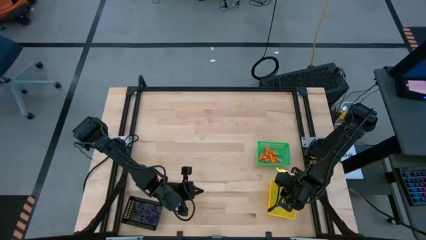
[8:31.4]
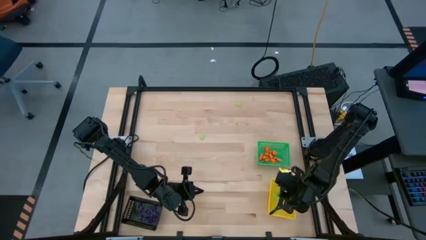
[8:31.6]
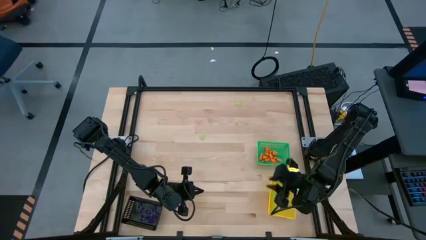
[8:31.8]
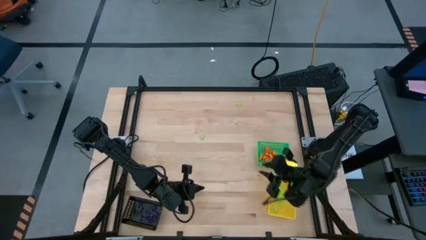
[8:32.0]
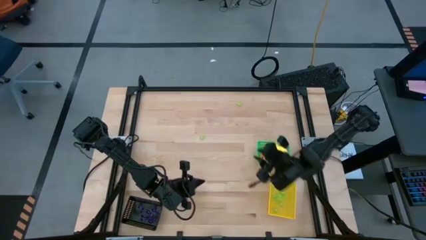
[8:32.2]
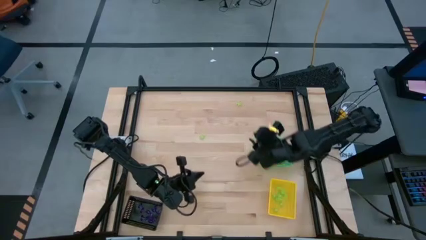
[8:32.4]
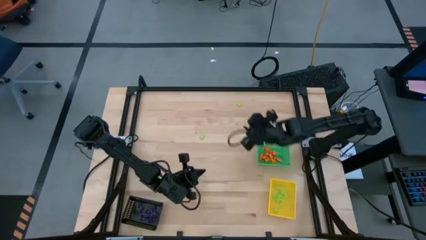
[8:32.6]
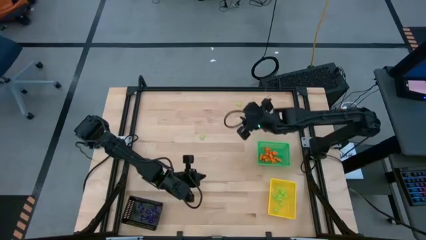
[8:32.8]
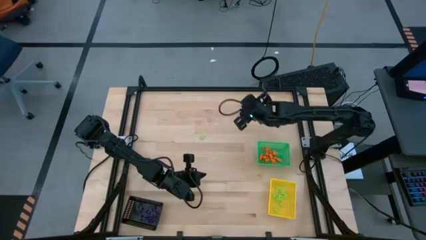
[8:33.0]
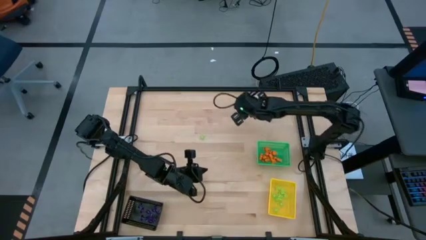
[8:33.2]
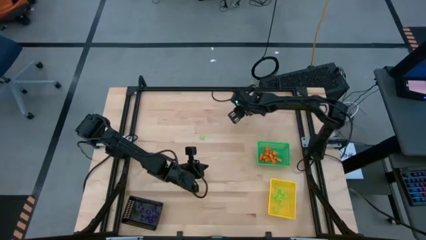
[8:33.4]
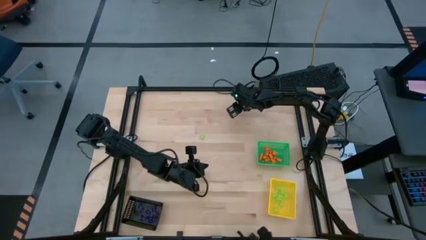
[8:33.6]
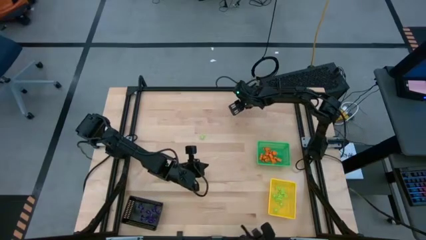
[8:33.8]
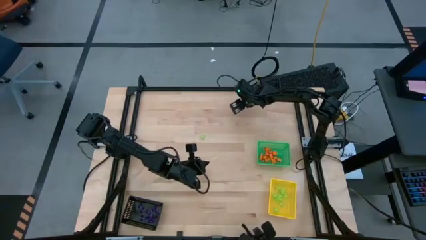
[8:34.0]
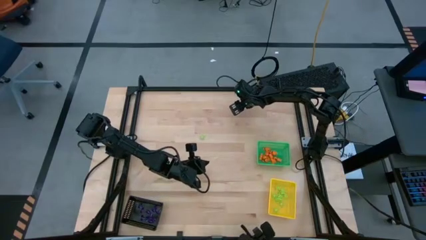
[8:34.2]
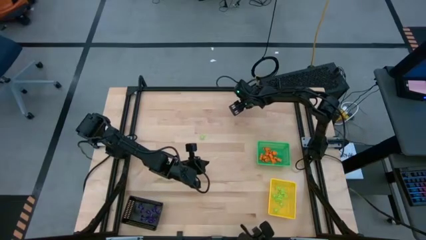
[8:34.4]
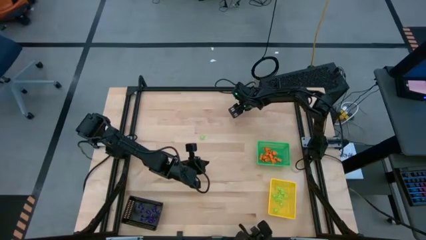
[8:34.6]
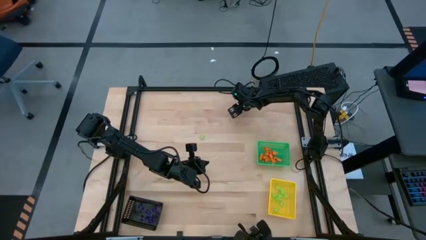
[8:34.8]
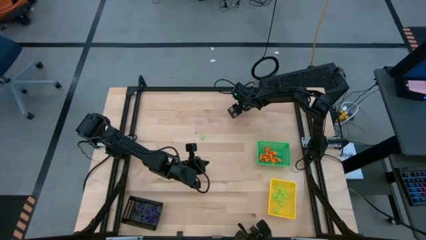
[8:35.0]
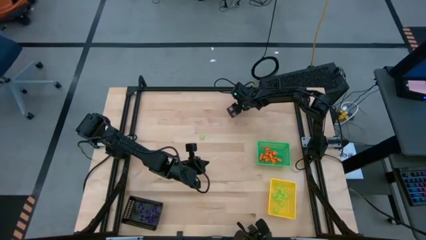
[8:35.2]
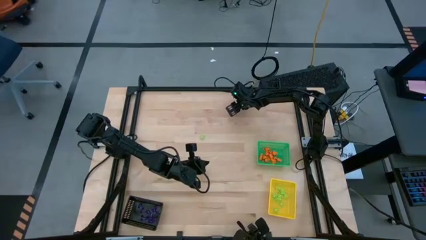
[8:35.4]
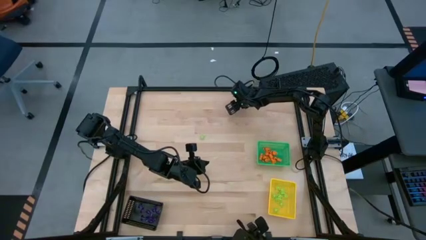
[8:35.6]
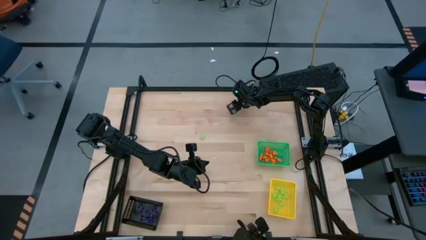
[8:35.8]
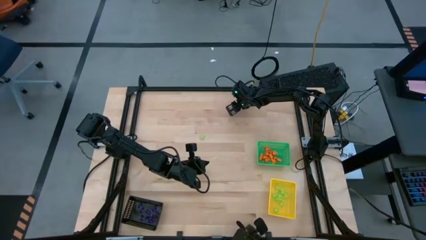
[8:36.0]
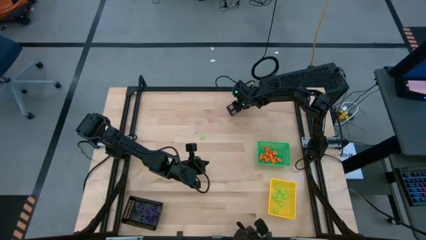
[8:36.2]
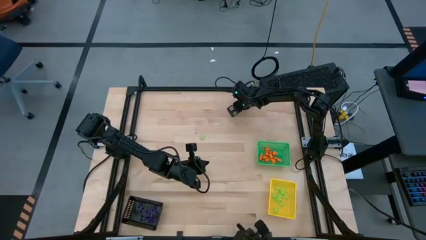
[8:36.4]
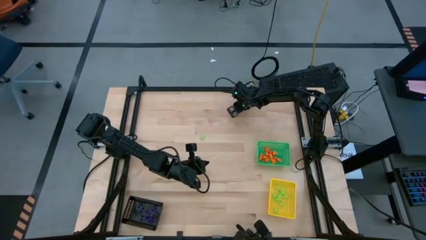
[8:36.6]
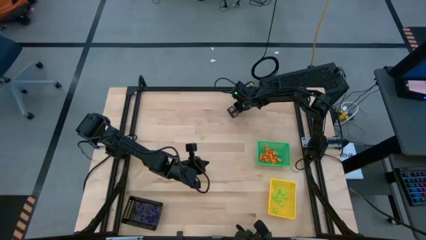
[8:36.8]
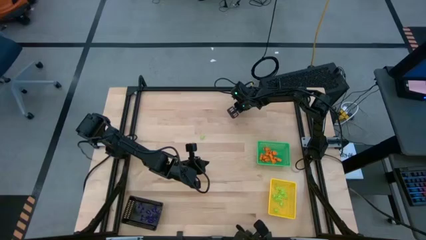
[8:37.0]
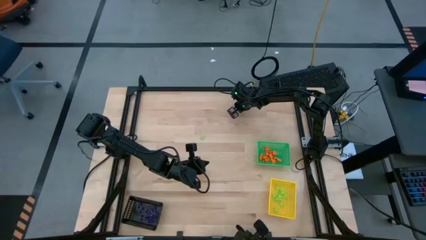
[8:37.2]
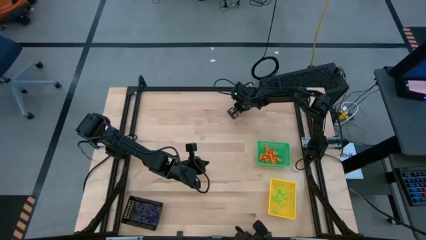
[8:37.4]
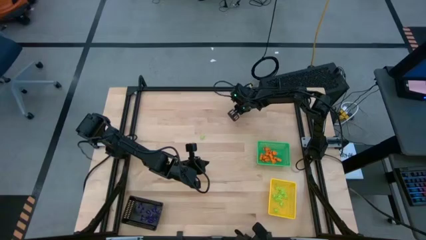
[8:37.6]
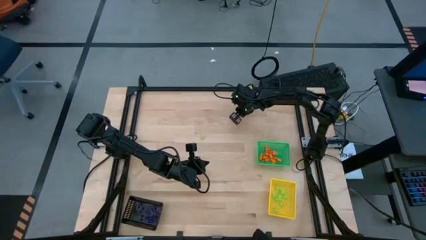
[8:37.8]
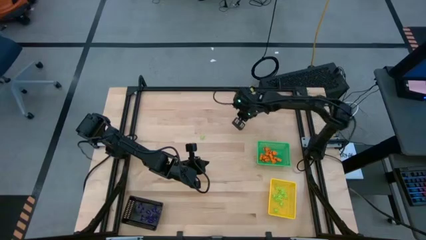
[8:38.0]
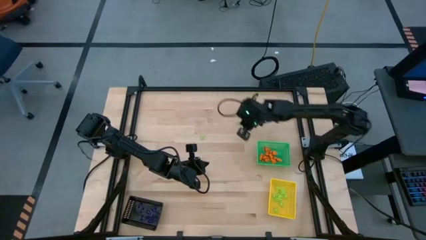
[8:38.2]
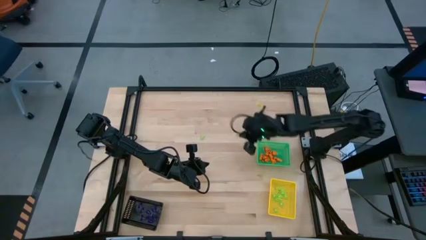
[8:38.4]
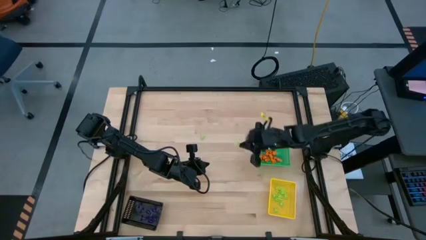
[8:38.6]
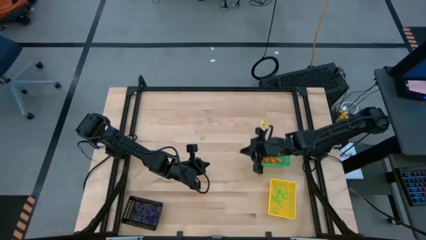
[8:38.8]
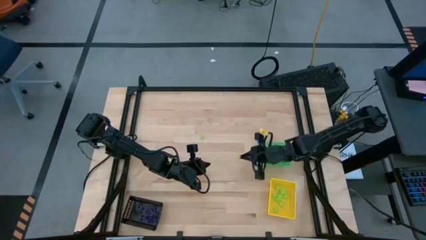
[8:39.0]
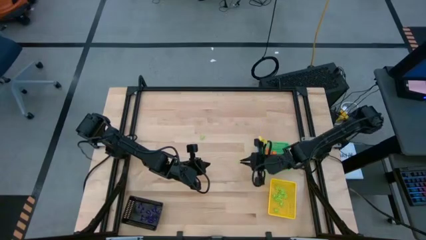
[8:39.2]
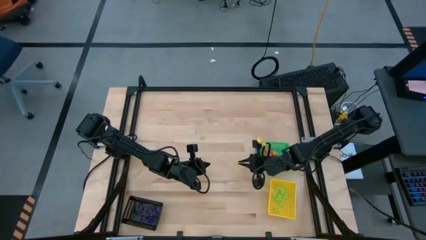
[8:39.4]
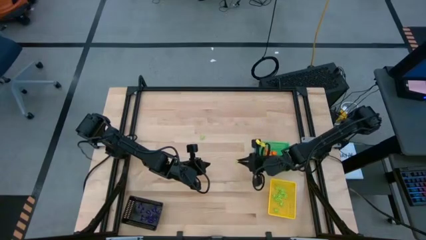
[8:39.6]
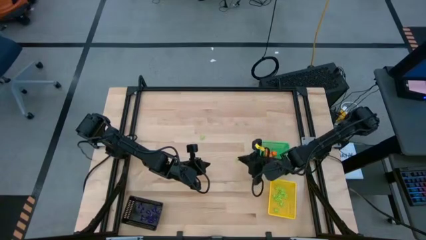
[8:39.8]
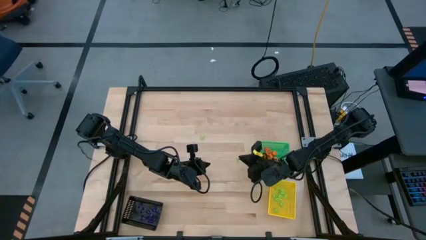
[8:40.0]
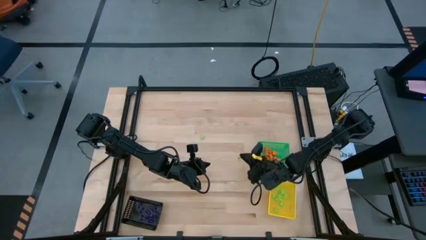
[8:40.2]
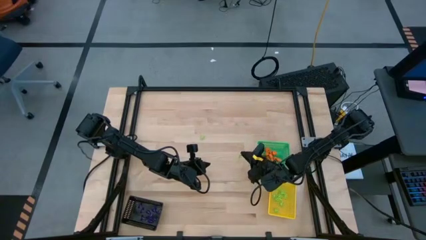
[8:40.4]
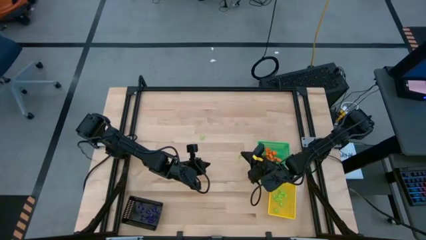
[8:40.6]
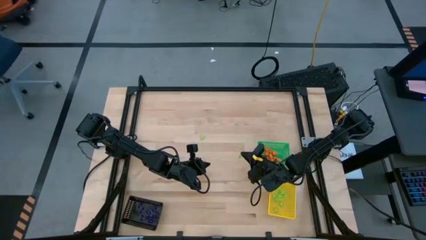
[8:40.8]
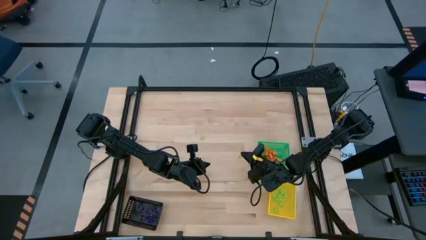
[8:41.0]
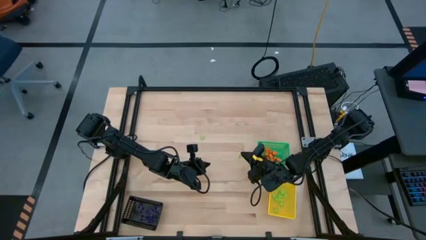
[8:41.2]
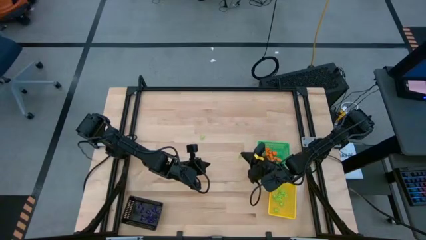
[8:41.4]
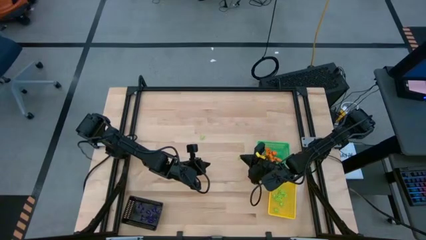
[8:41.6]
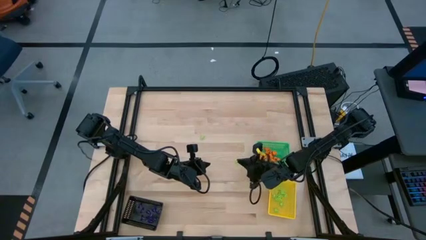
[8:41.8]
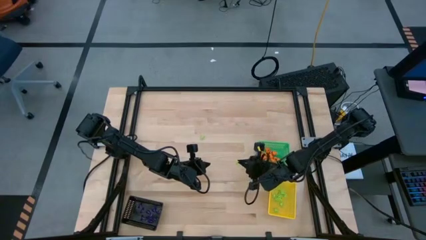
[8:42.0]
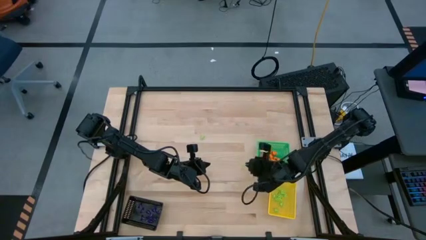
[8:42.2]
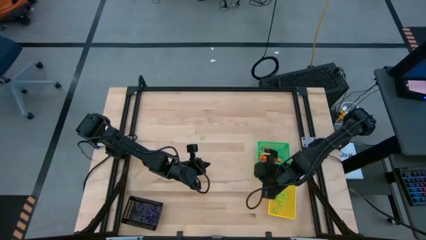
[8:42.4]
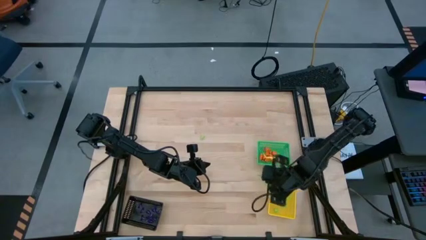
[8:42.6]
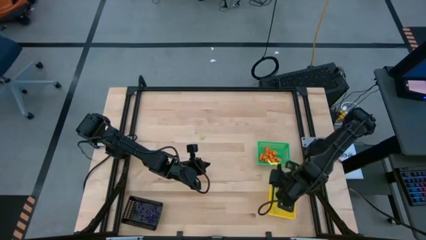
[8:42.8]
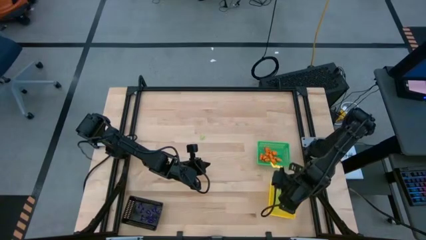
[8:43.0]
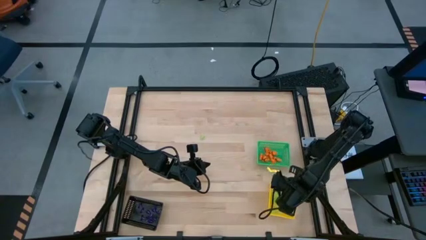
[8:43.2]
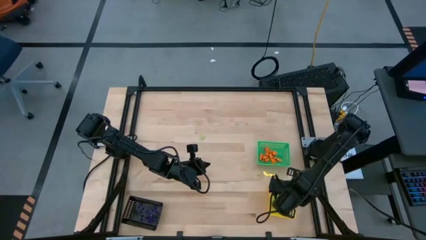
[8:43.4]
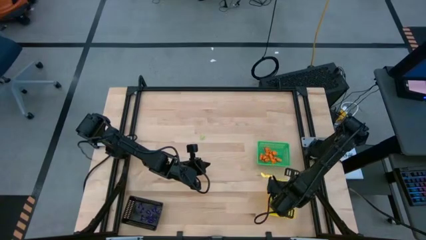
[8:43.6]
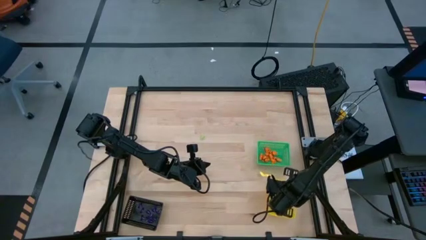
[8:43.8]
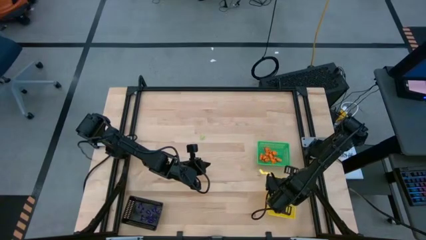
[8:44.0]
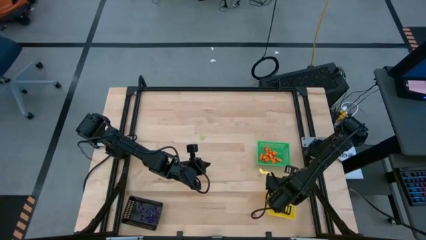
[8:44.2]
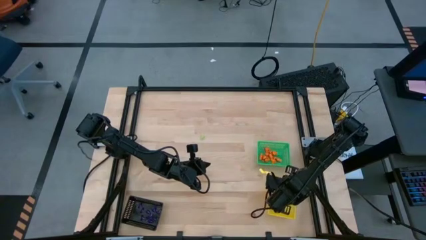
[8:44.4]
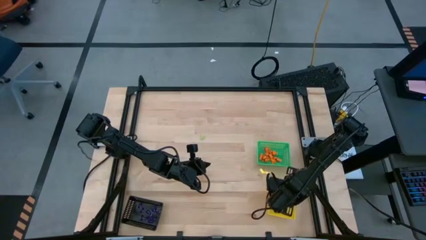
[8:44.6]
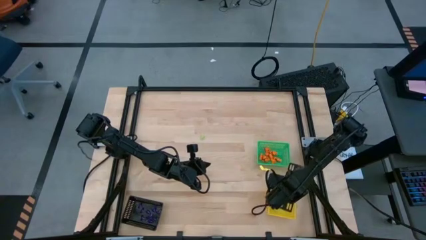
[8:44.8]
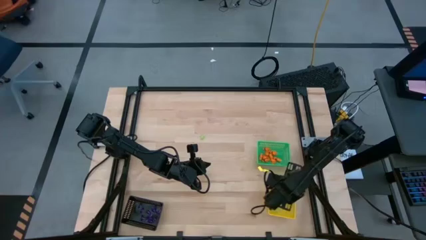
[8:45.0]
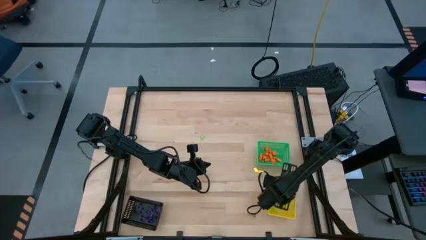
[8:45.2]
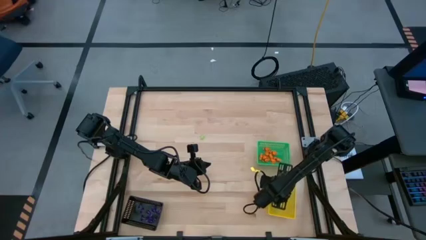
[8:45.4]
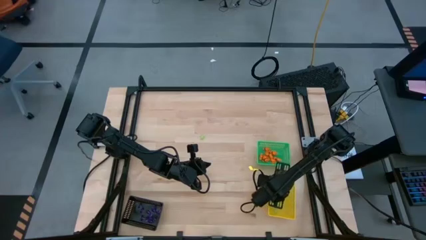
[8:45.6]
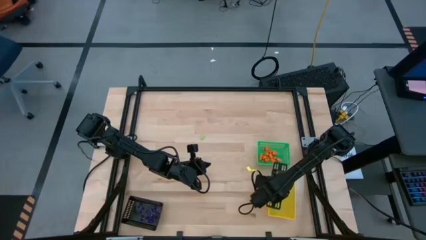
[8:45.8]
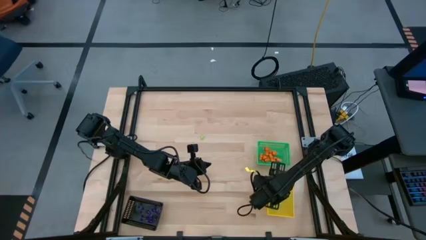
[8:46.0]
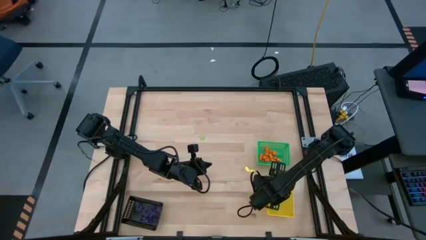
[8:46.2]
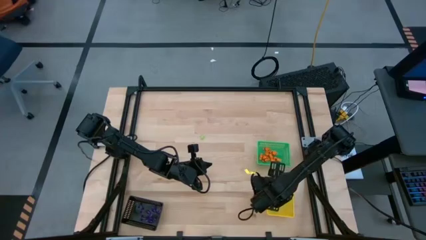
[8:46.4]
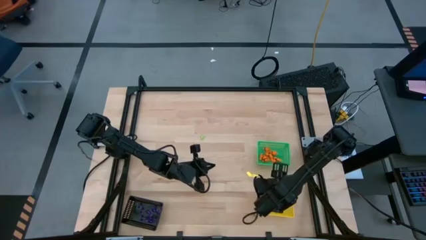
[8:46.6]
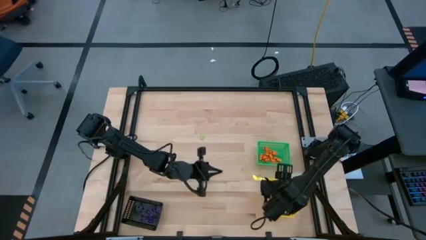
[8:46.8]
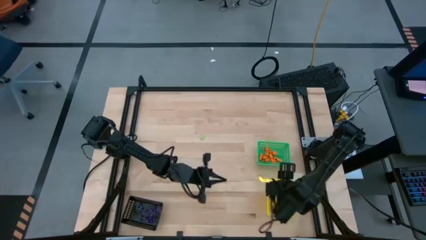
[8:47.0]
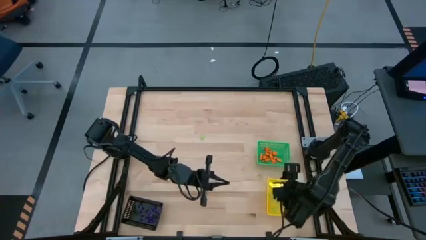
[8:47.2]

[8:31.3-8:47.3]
Task: Sort Halloween decoration
Put the green spider toy into the yellow bin
